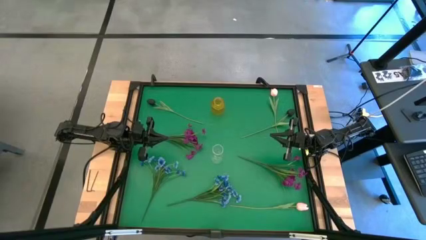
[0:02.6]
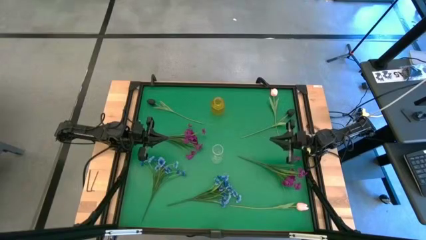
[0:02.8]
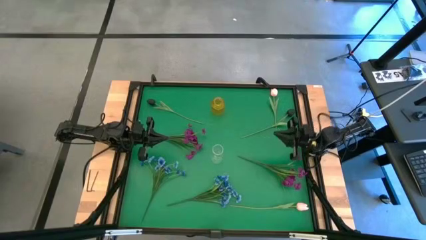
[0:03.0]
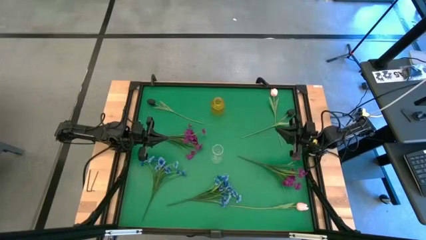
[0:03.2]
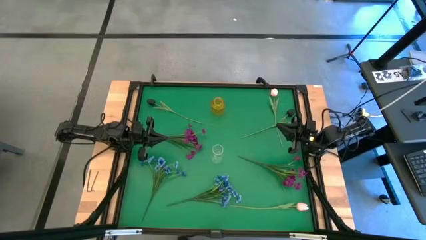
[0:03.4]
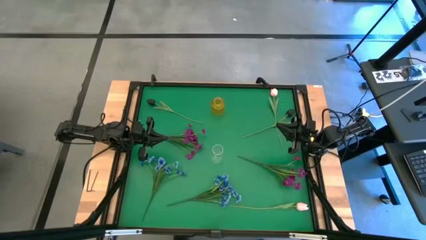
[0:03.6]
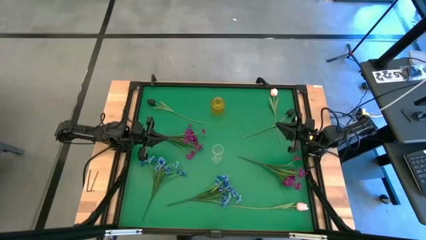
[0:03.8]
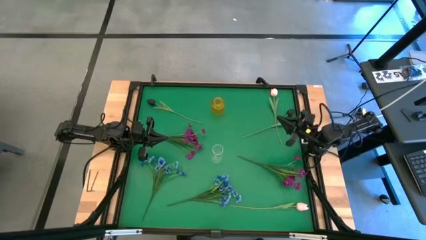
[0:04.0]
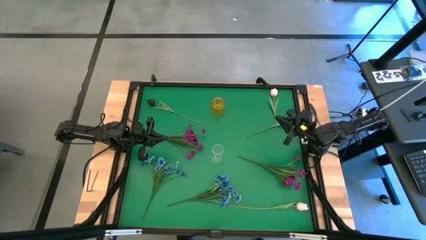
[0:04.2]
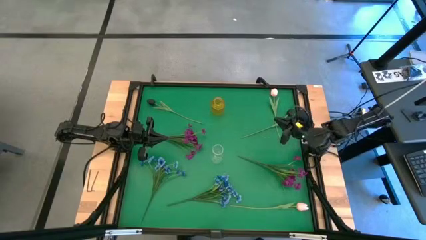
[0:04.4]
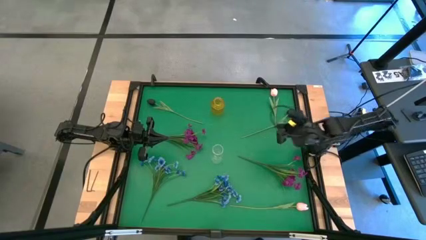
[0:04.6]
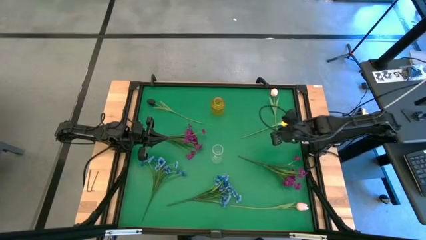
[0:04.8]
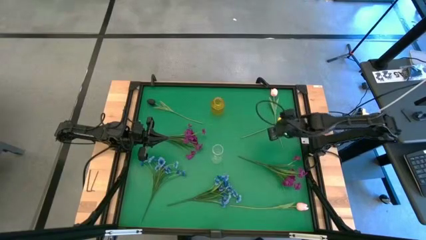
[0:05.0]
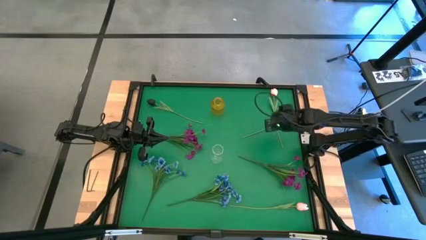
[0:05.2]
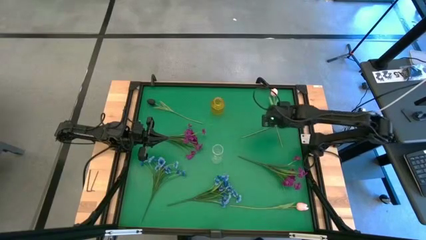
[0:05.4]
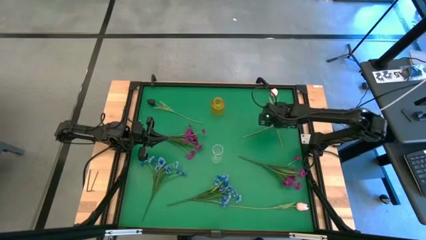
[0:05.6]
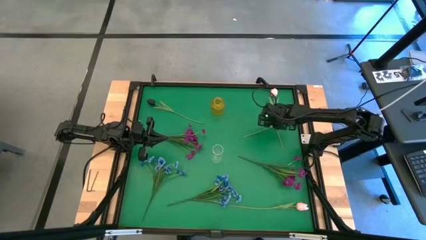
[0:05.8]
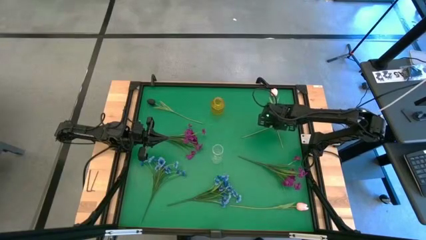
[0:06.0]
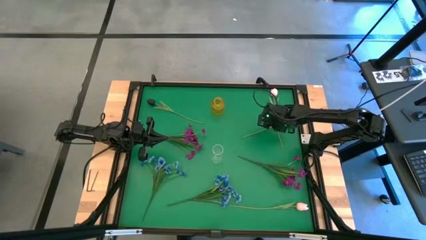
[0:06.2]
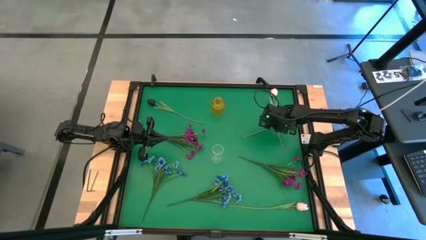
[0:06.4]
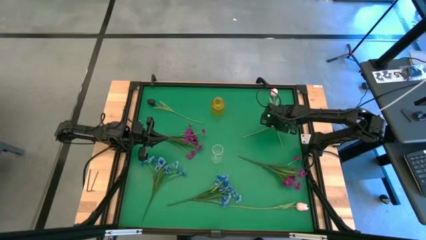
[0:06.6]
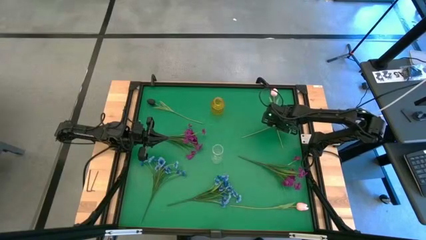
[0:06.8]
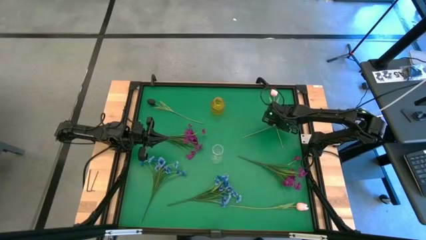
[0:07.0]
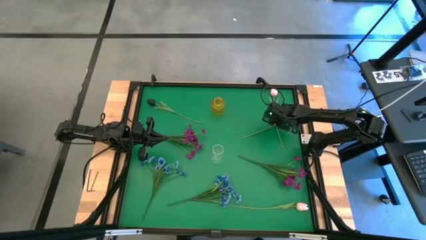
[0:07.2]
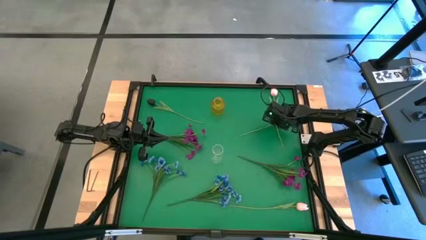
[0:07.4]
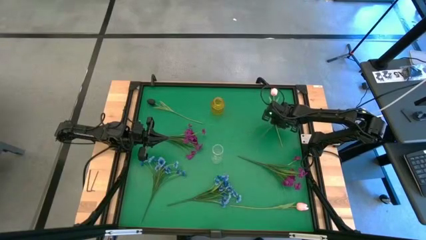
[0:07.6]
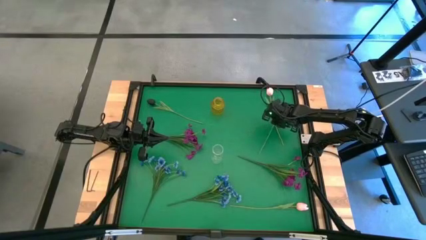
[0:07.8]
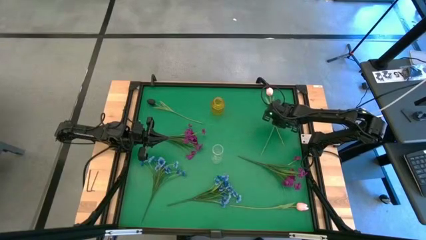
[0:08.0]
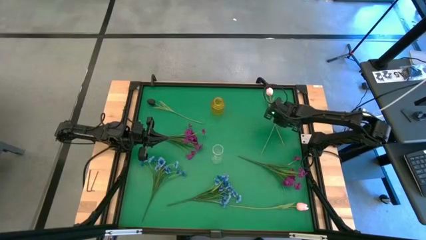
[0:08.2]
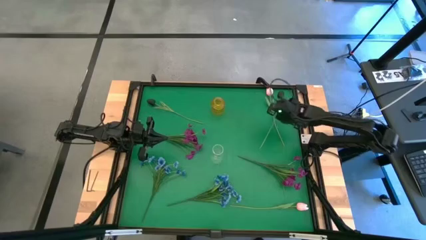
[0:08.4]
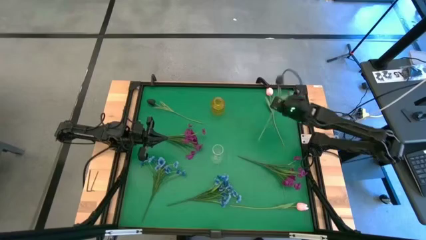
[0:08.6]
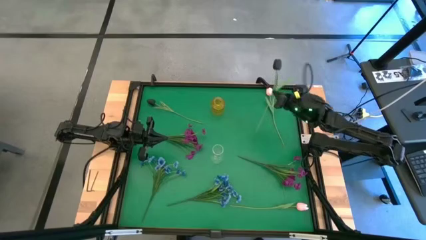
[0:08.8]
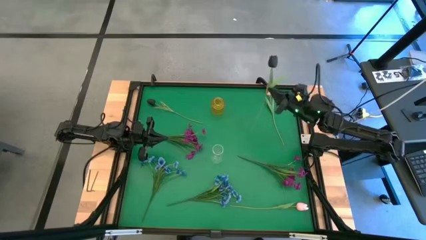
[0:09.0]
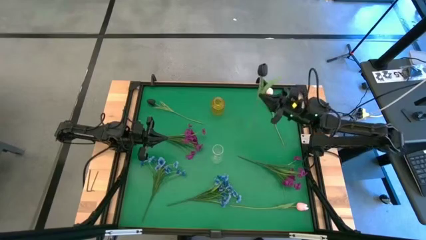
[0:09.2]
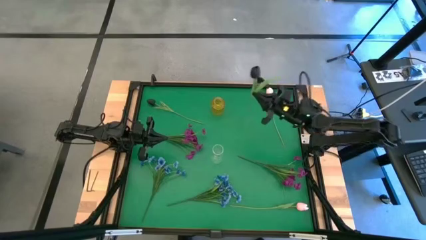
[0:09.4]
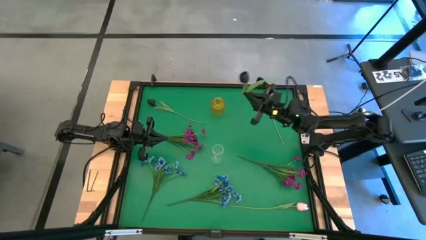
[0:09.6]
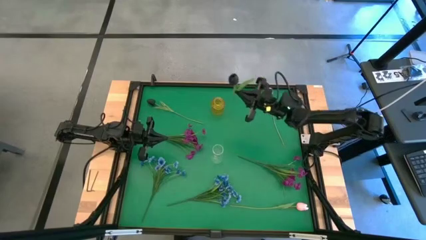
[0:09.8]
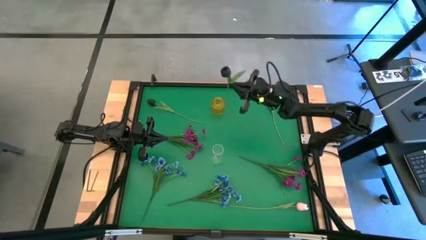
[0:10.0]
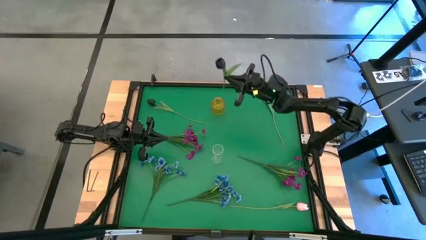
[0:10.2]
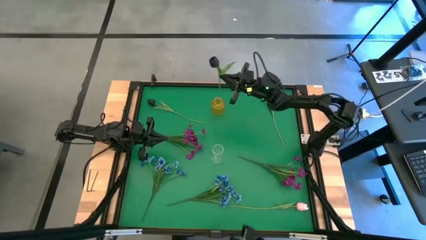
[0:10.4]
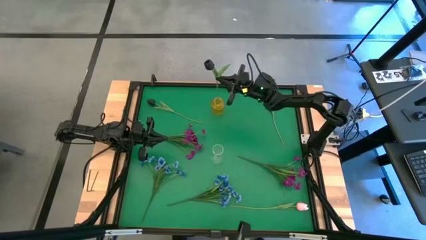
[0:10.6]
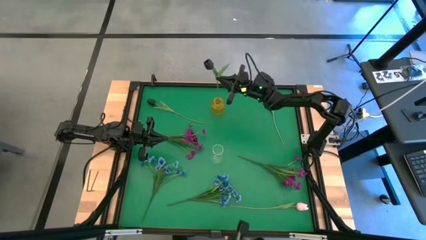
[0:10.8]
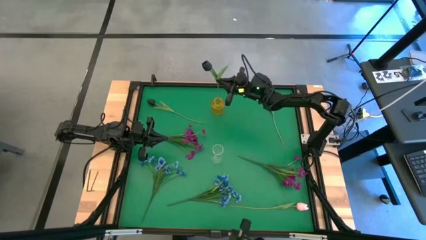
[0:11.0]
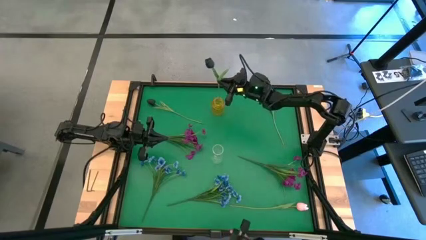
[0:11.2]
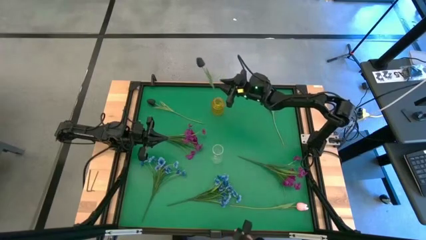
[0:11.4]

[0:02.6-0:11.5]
Task: Sort flowers into vase by color
Put the right black flower into the yellow vase

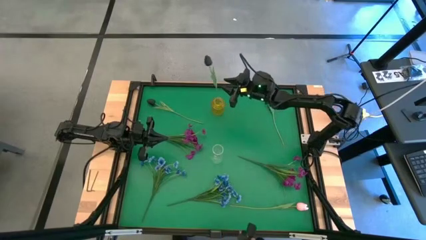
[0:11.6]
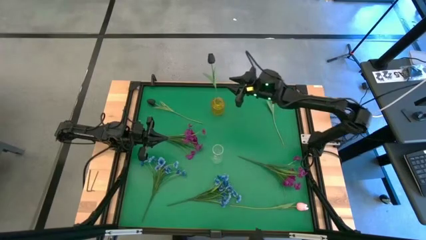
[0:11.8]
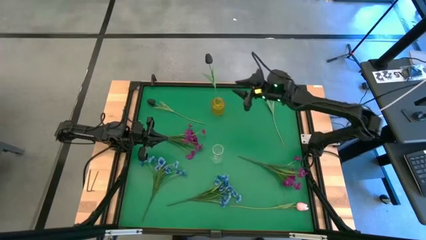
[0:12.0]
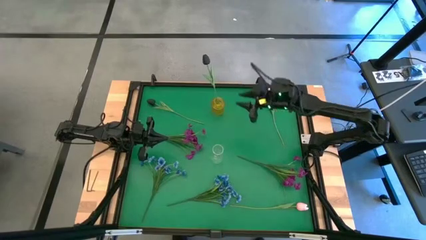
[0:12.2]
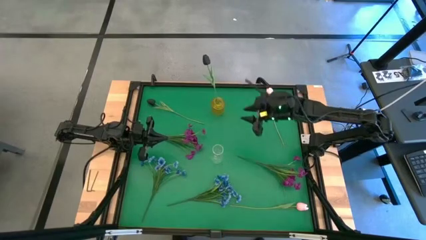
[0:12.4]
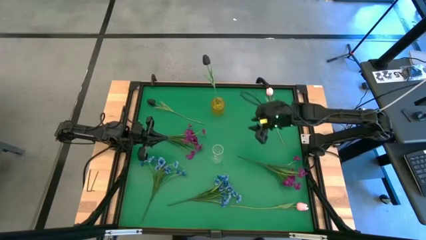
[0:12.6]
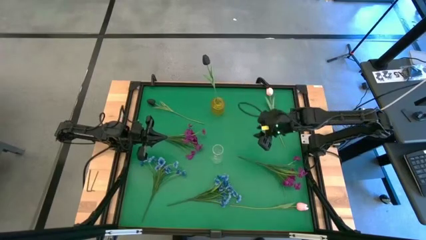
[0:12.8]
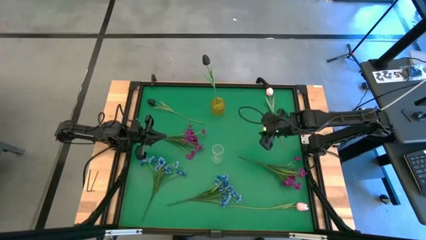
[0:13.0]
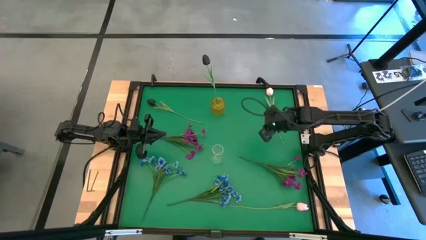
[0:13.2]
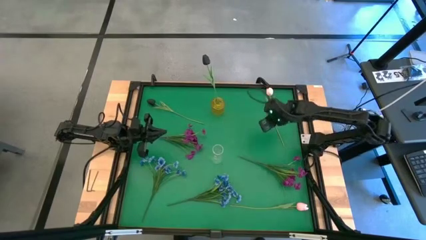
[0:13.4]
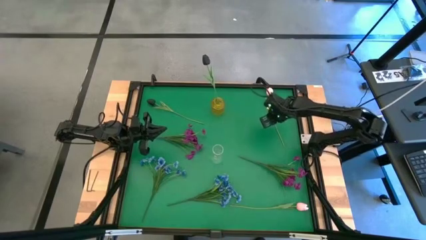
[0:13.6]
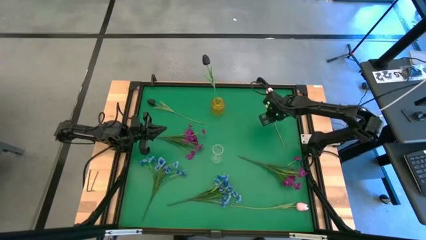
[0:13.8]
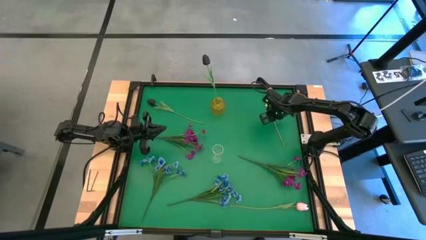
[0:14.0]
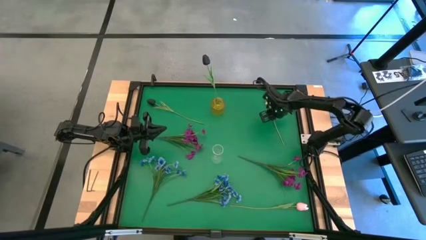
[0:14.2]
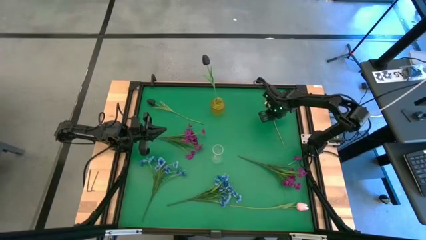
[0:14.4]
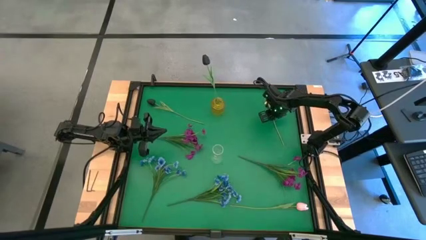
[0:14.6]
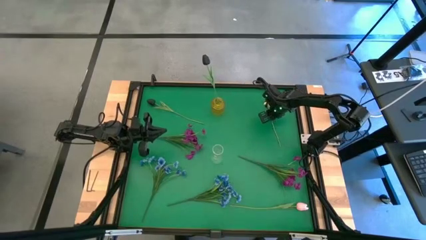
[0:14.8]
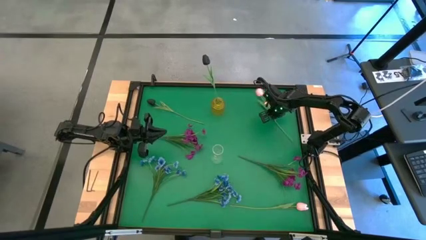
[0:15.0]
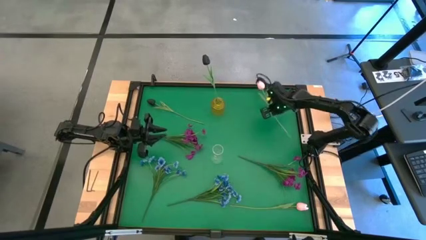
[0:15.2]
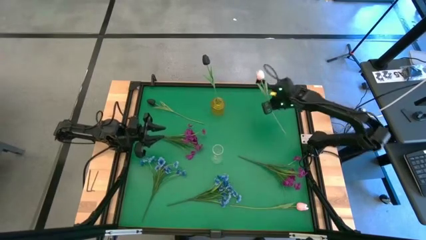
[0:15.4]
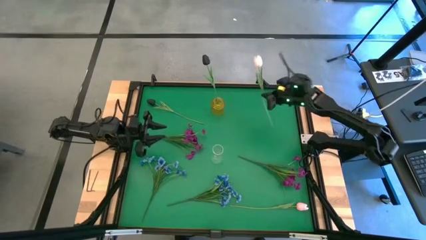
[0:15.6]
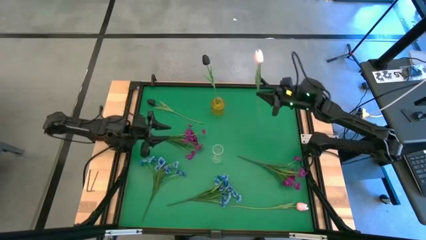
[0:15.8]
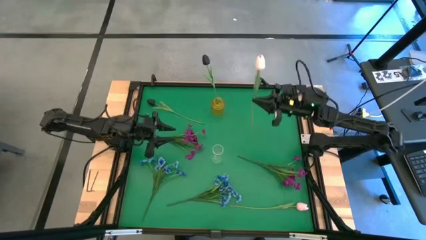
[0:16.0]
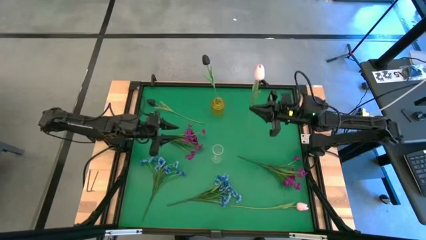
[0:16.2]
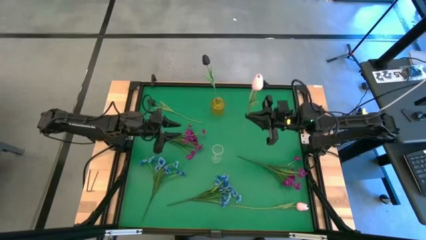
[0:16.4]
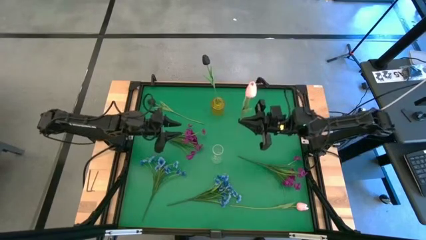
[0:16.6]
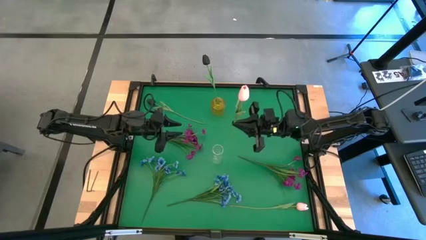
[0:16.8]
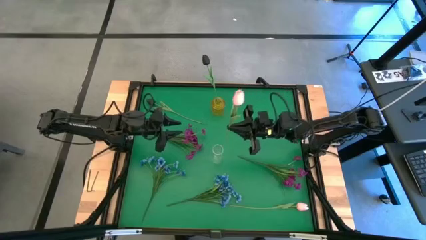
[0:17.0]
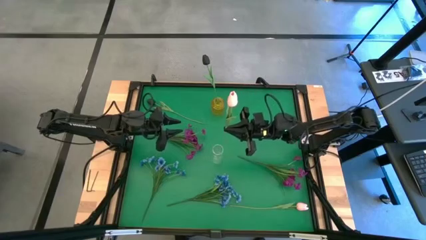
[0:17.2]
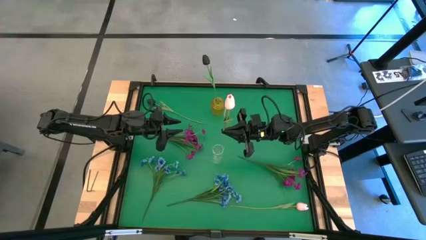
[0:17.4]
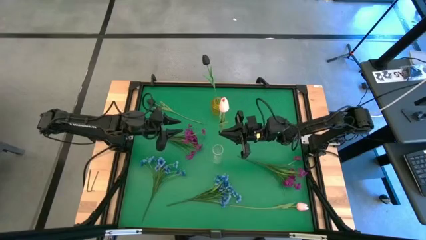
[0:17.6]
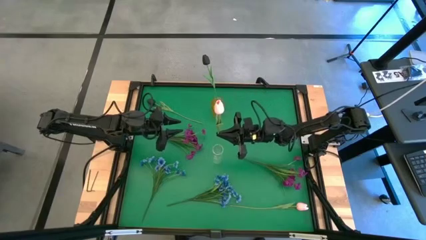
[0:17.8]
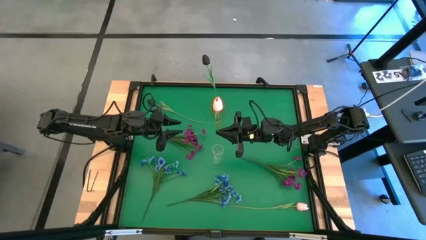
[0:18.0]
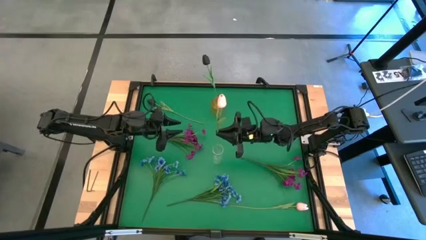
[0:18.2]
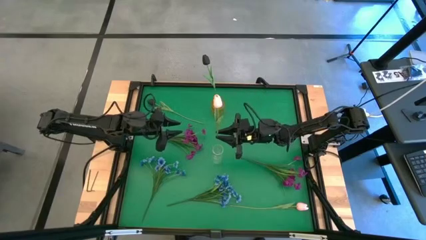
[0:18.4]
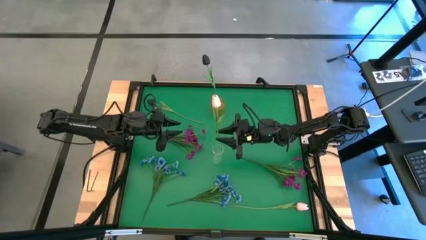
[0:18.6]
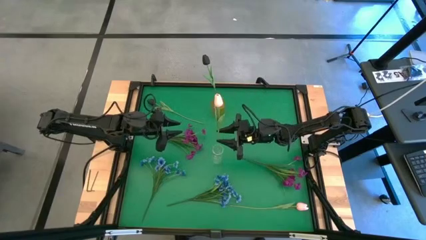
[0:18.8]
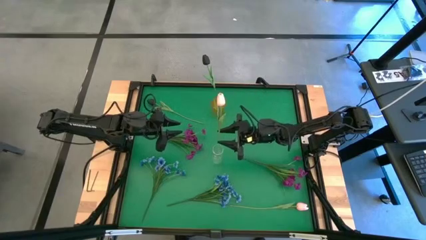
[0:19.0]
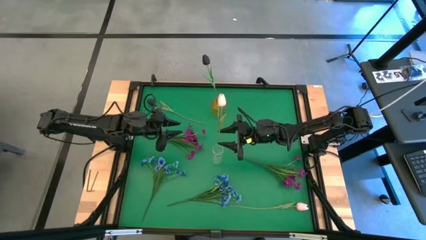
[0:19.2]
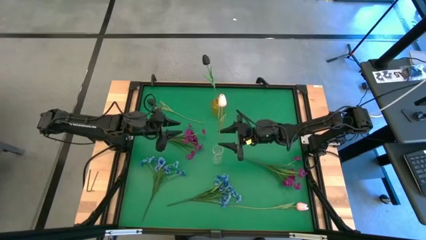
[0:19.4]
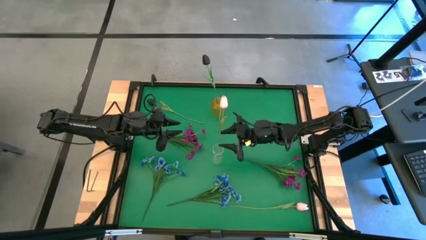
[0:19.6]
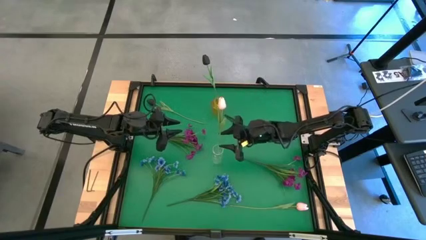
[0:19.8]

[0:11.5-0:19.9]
Put the top pink flower into the transparent vase
